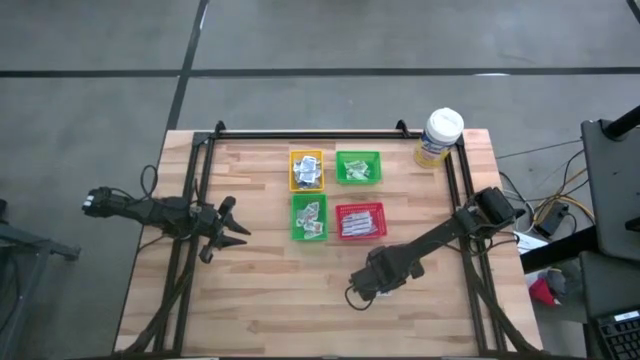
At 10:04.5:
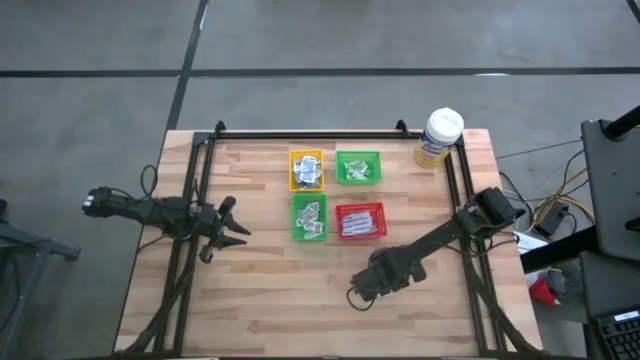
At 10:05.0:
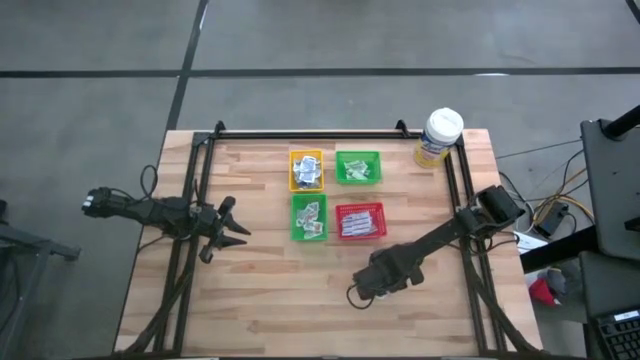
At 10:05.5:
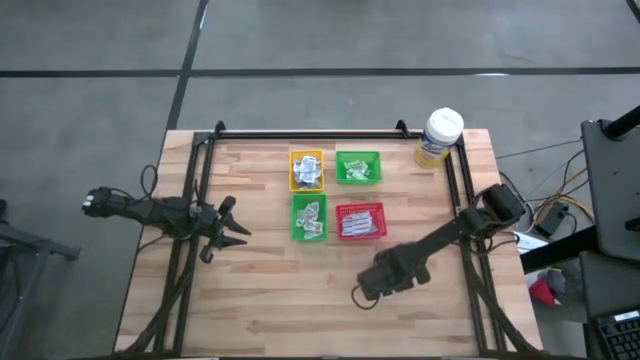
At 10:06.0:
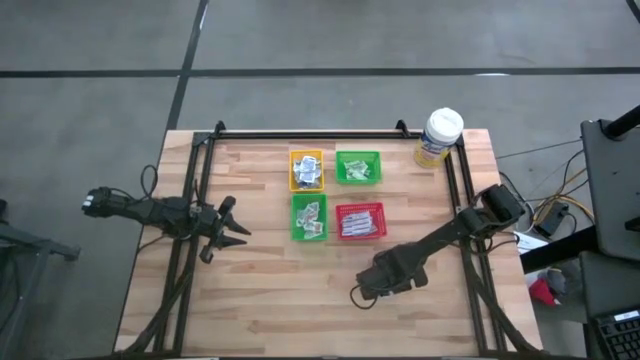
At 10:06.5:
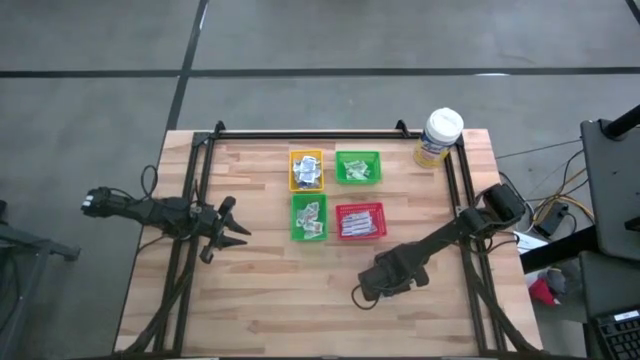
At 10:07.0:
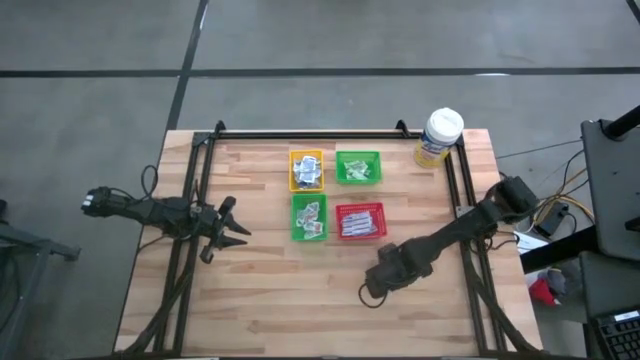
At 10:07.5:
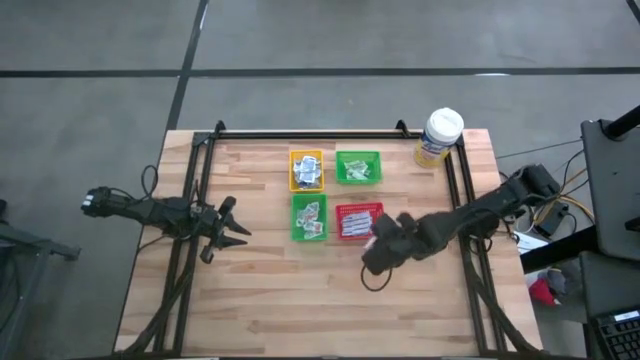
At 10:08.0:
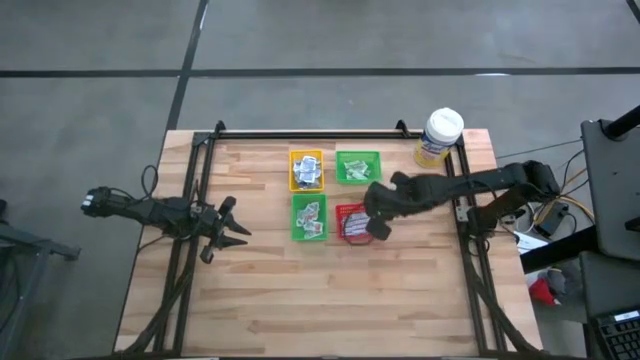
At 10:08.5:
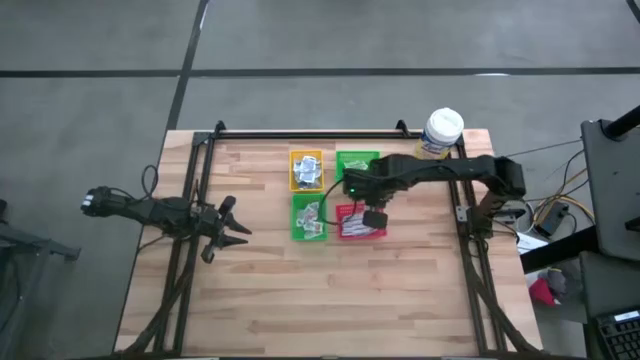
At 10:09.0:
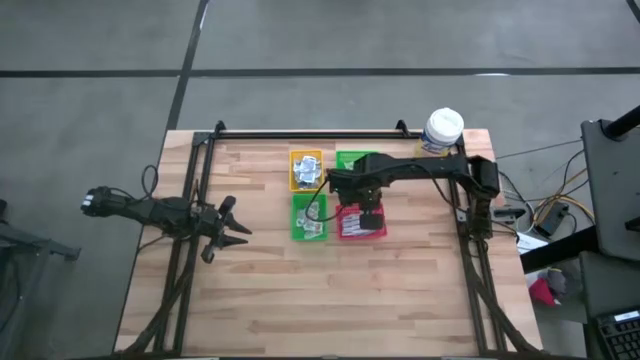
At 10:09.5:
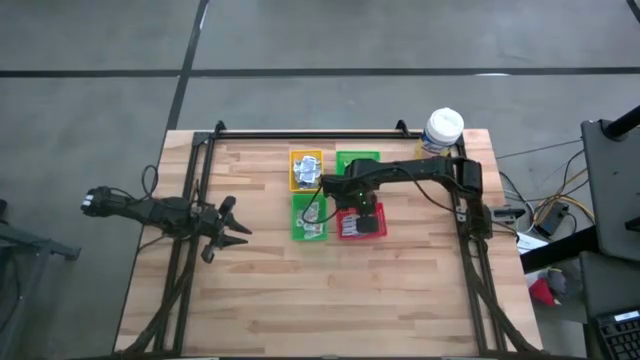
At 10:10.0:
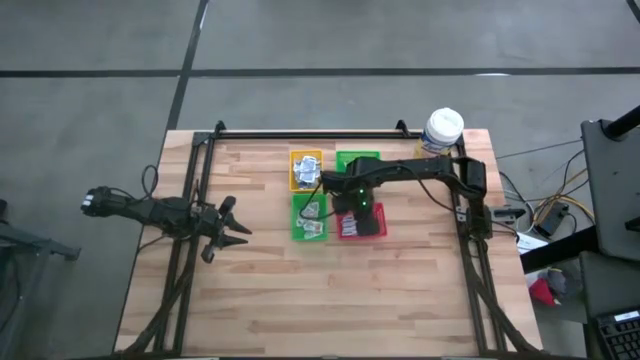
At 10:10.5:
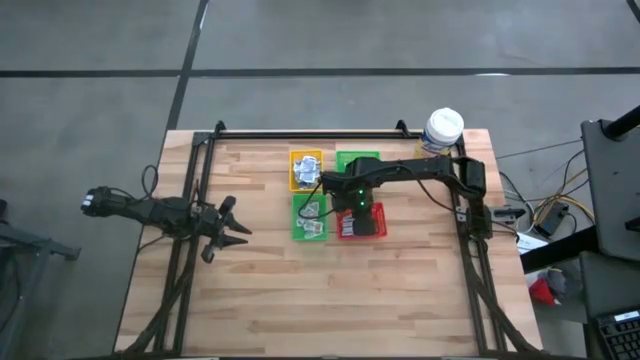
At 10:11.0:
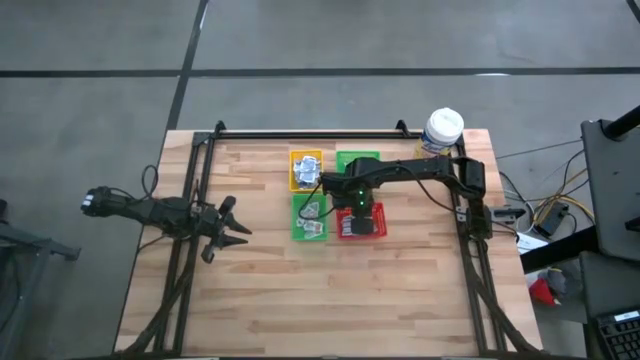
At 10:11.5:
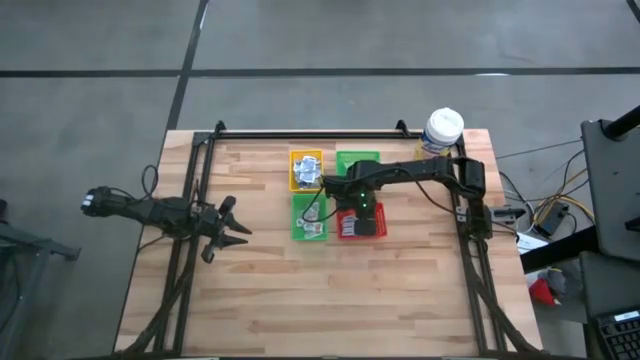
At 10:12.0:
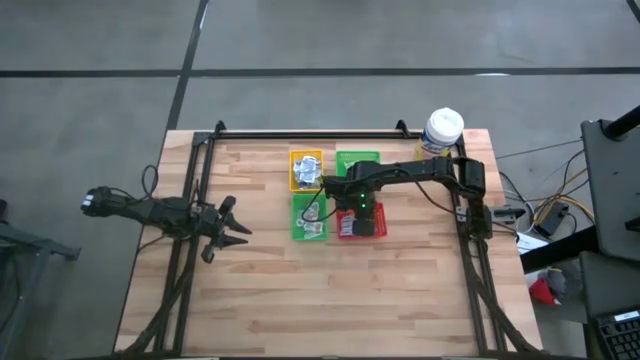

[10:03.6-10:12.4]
Task: Pick & Place First Aid Supplies
Put the blue bandage pack into the red bin

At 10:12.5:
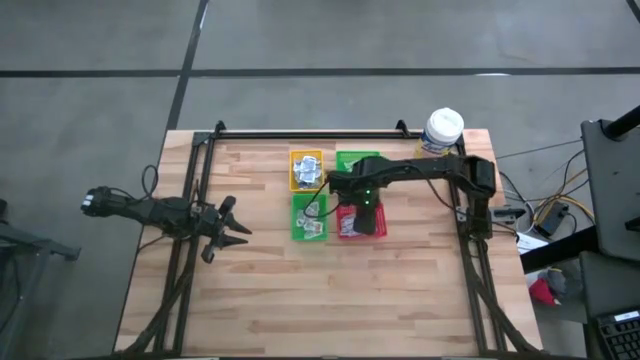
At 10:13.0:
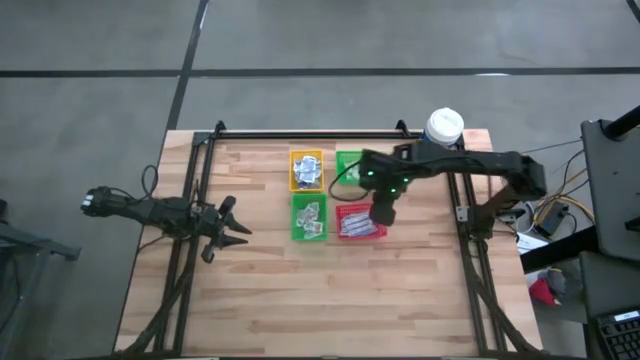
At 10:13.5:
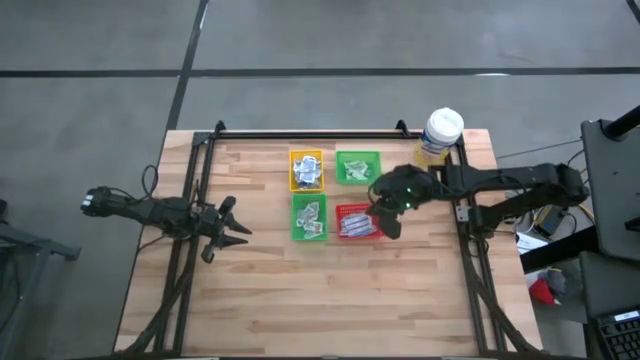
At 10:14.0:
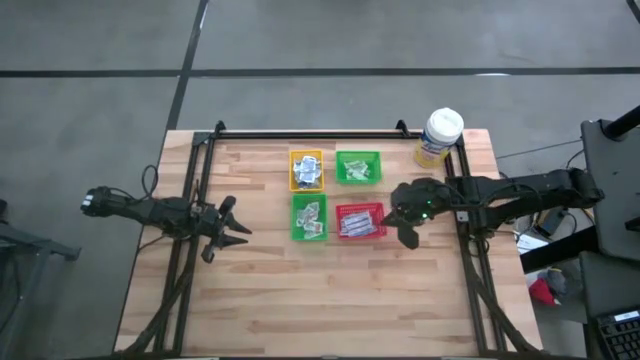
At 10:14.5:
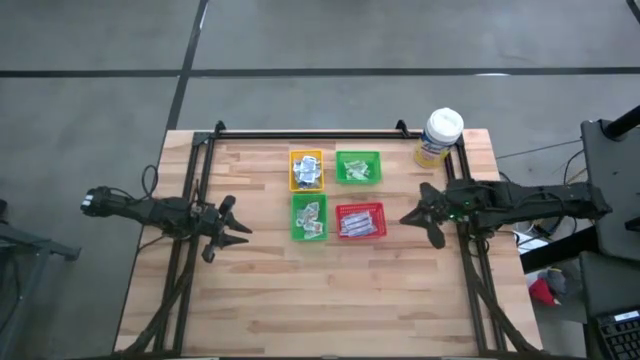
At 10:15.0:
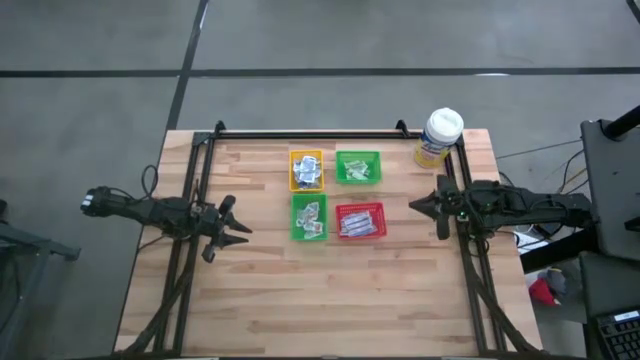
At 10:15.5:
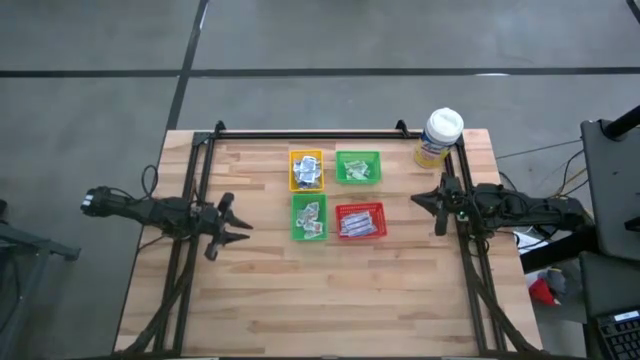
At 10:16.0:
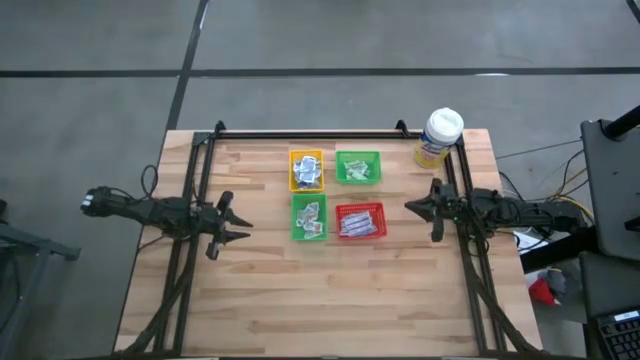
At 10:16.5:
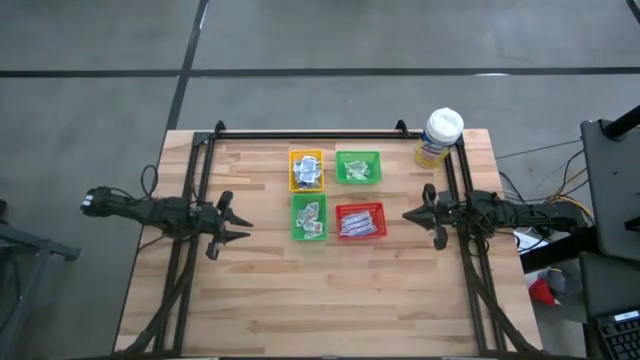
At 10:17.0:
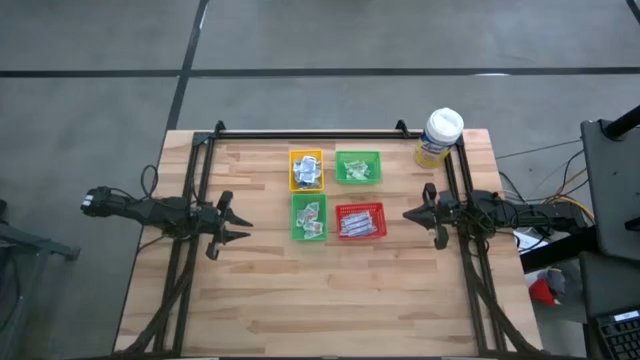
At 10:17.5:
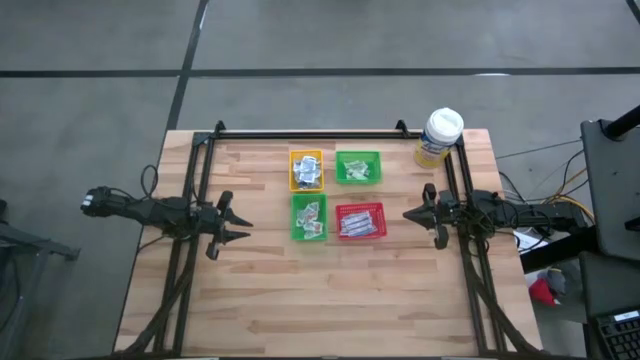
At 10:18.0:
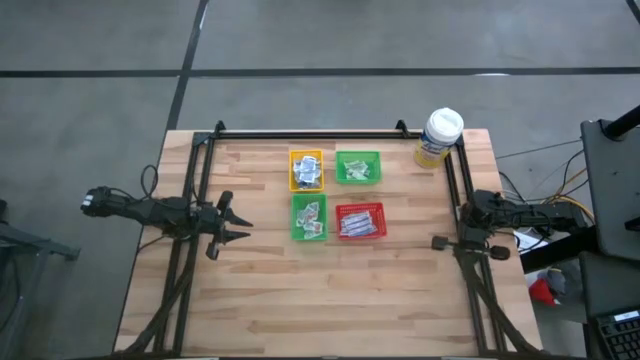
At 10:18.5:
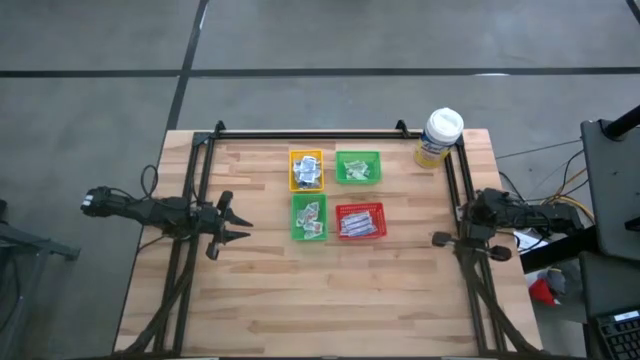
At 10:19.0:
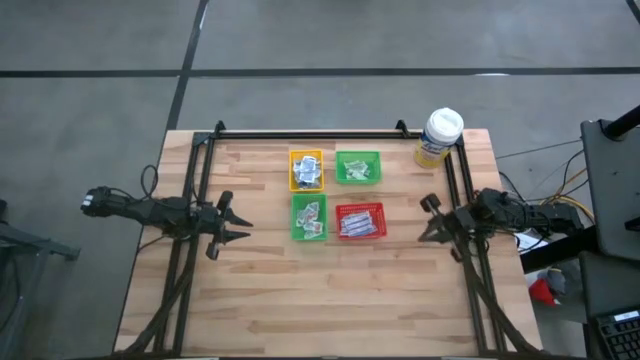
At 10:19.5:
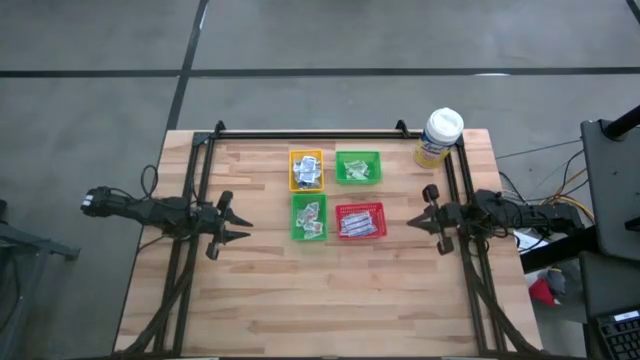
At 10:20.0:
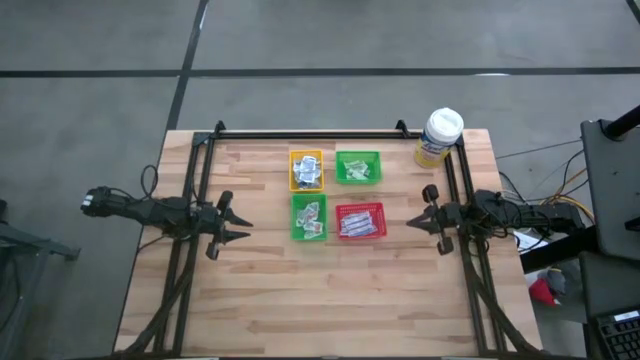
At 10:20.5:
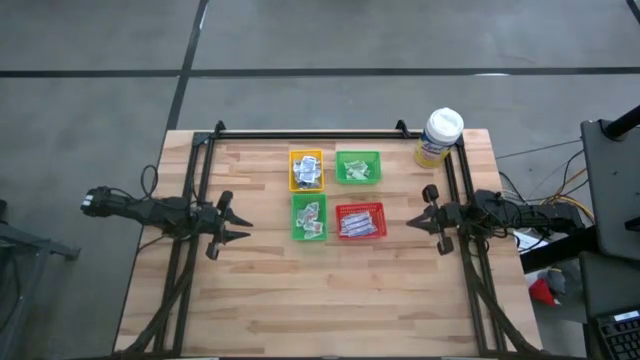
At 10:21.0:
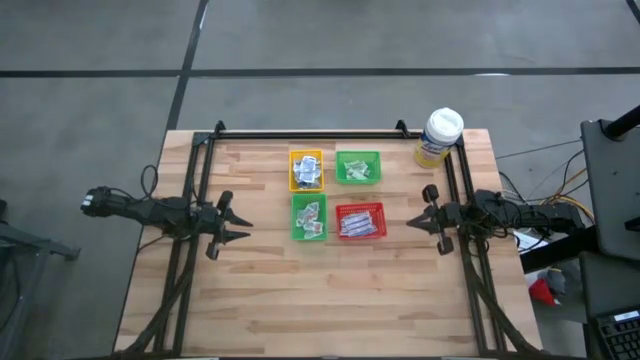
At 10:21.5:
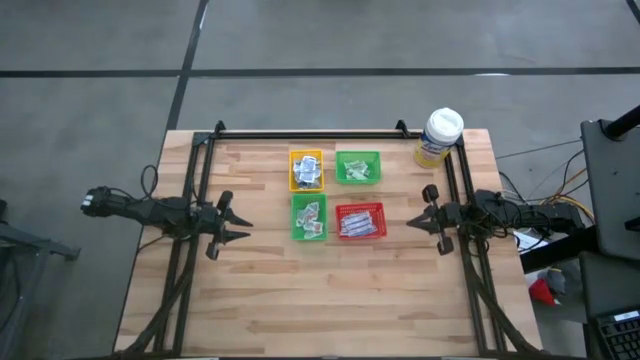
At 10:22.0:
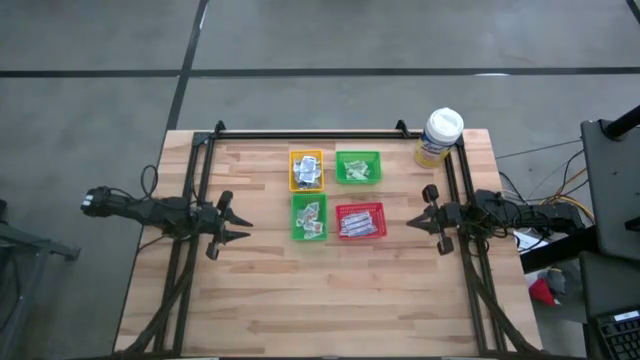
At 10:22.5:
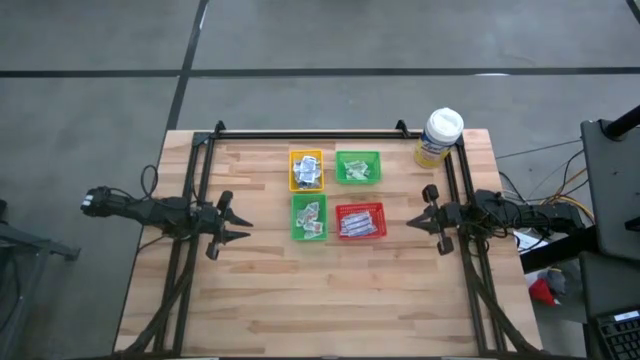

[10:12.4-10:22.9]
Return to Home Position

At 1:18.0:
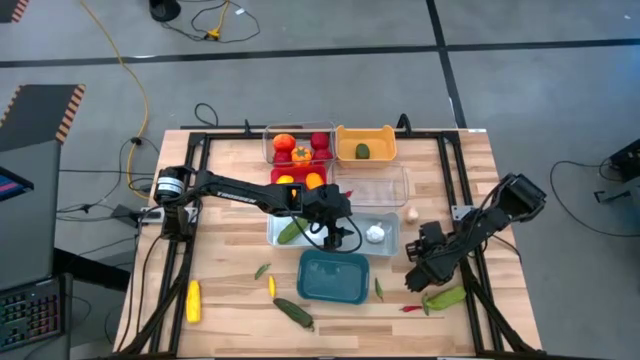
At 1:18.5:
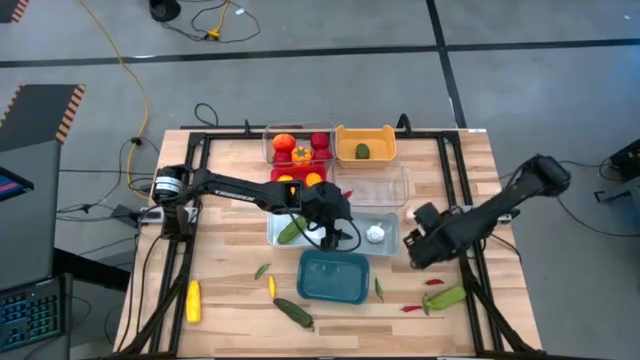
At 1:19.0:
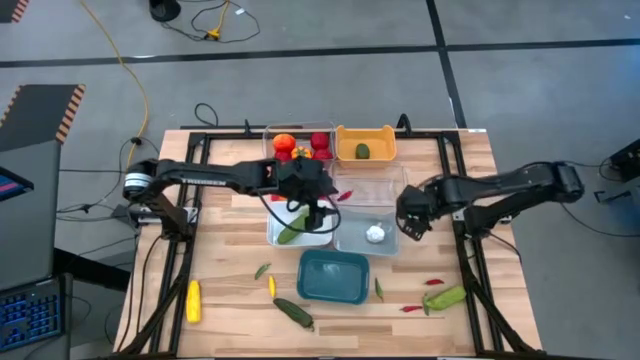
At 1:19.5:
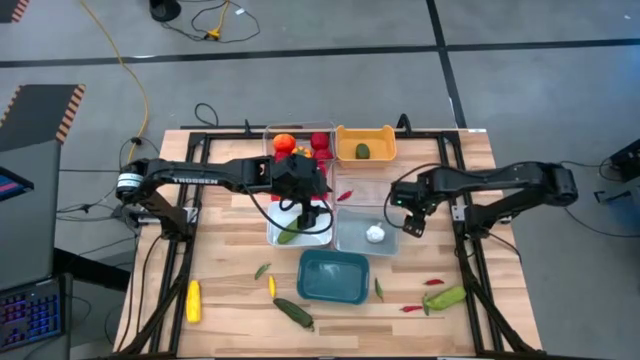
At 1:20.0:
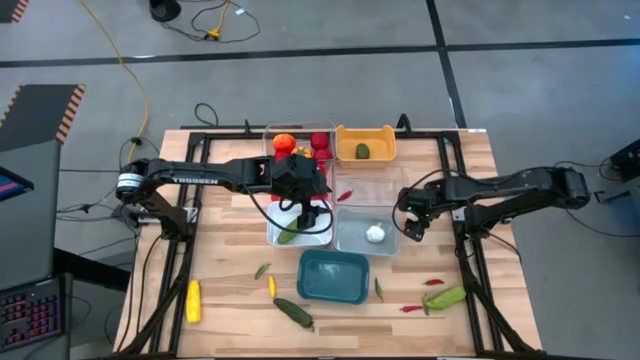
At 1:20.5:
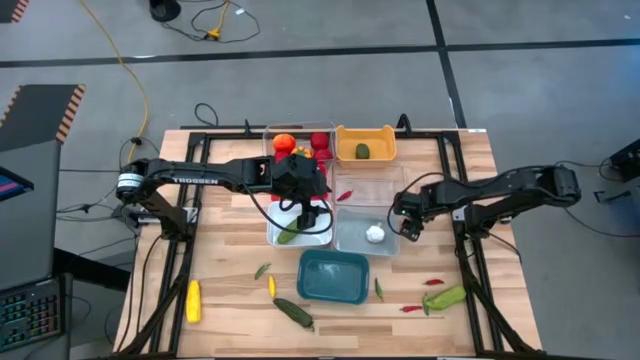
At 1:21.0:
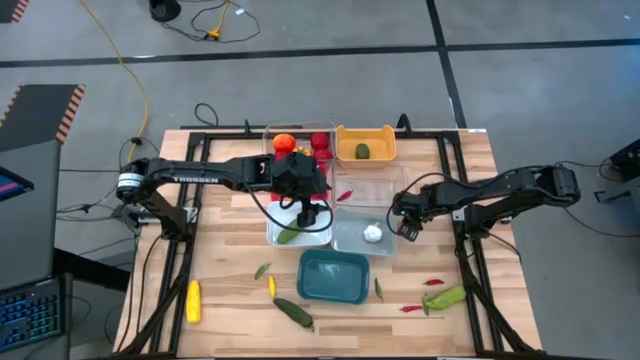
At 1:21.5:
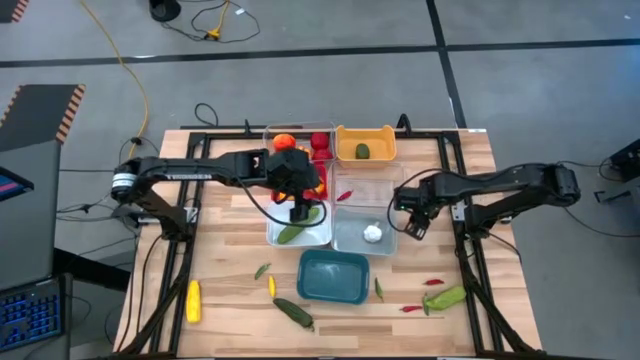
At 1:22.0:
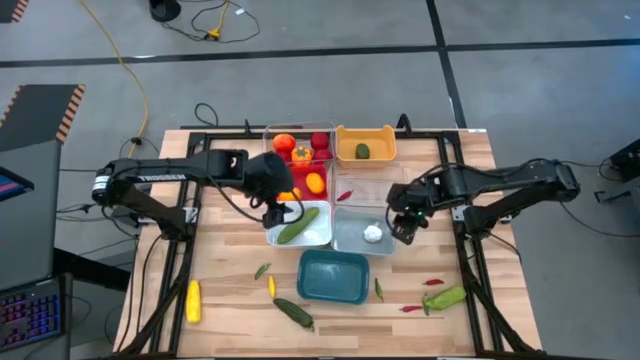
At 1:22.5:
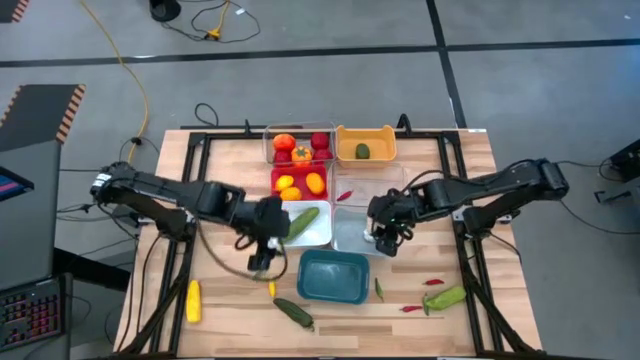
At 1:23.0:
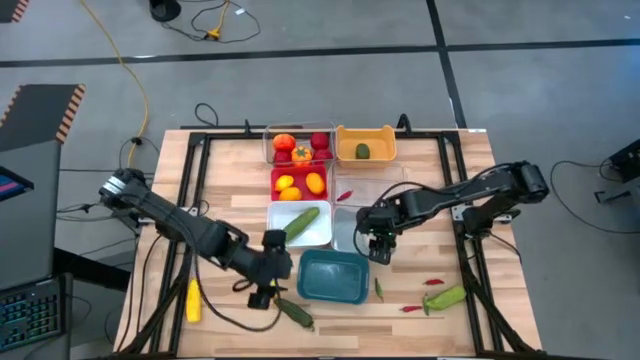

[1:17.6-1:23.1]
Task: Sort produce into baskets
Put the white garlic into the gray bin
